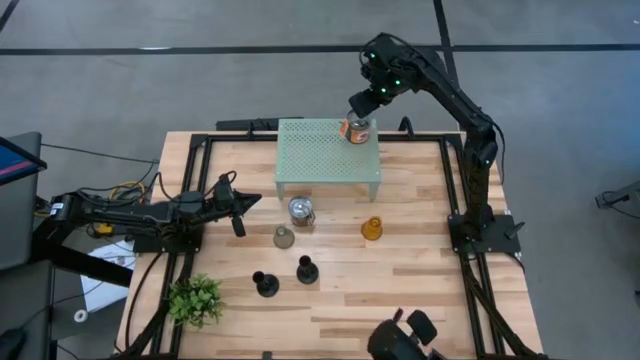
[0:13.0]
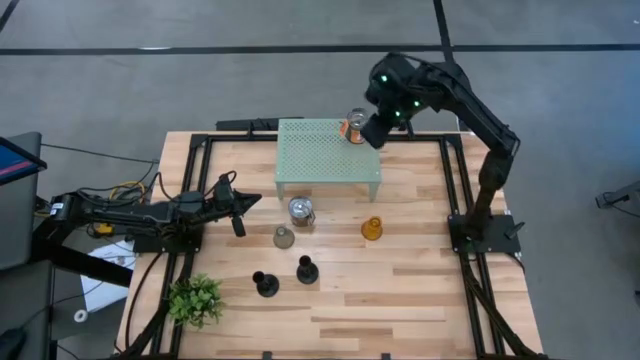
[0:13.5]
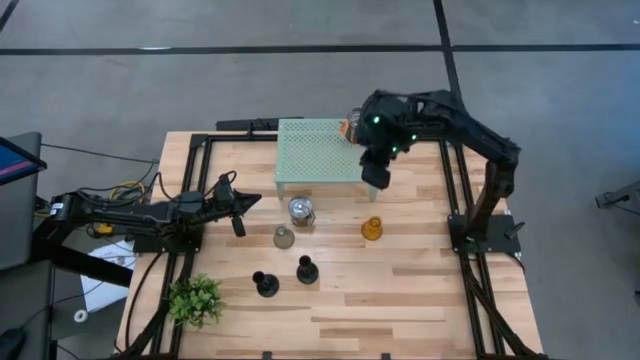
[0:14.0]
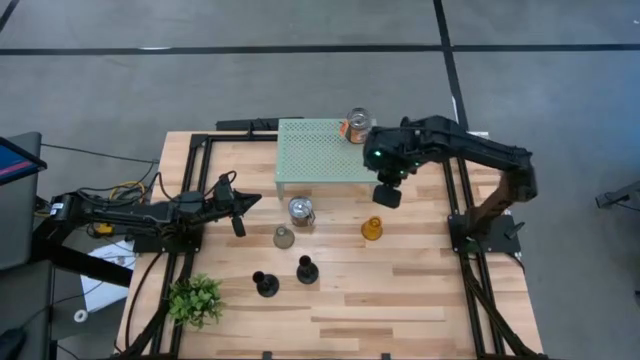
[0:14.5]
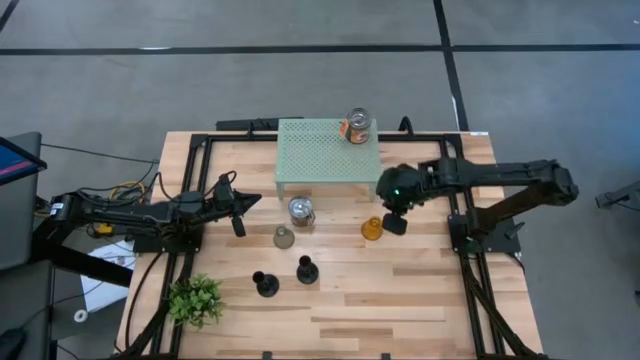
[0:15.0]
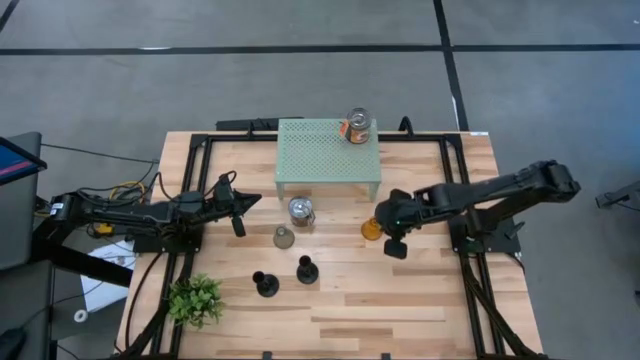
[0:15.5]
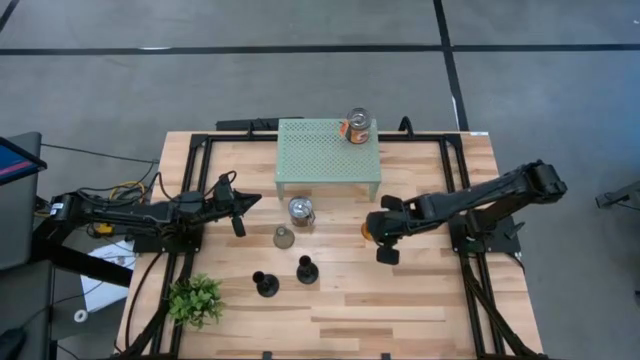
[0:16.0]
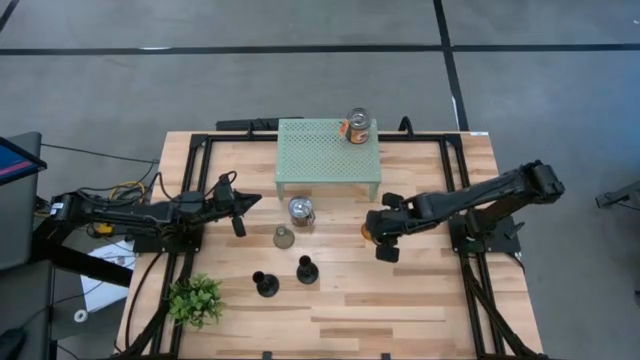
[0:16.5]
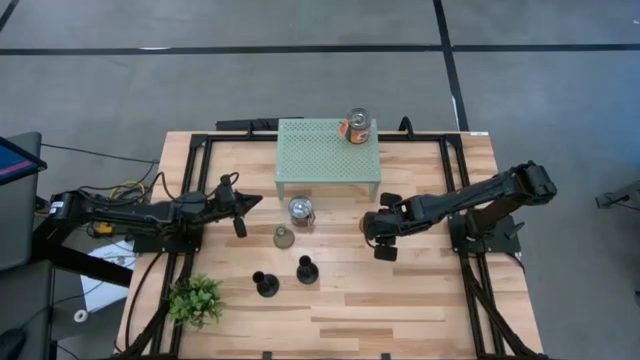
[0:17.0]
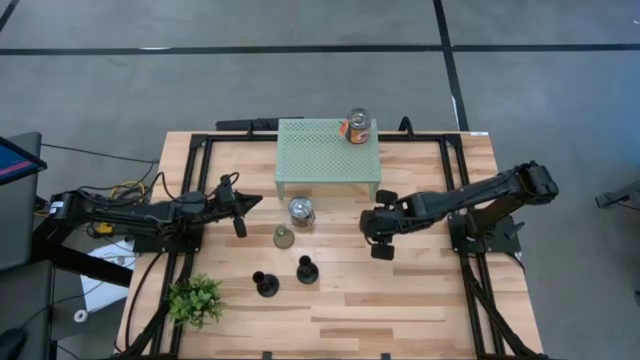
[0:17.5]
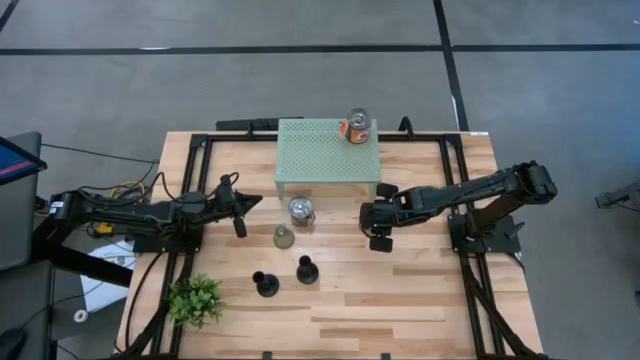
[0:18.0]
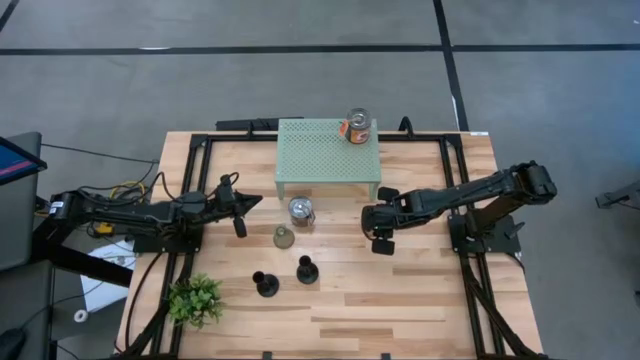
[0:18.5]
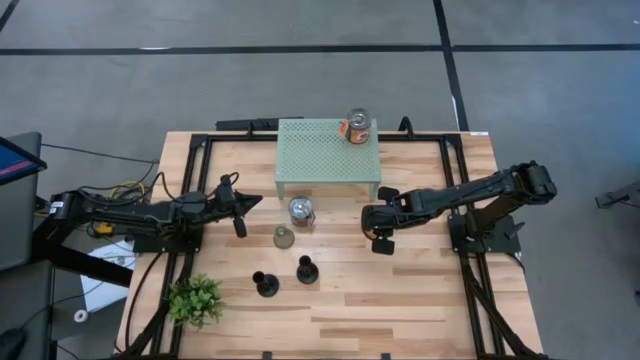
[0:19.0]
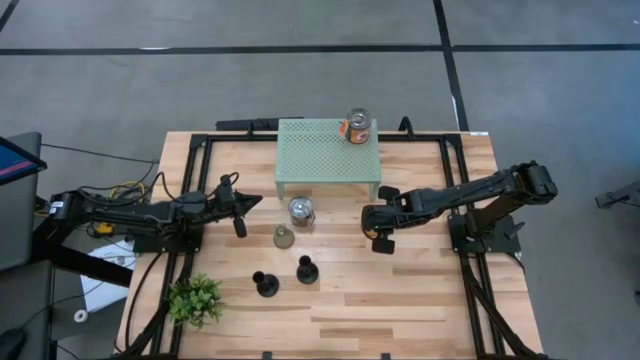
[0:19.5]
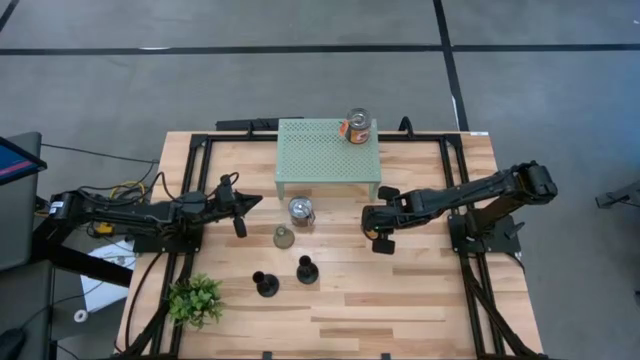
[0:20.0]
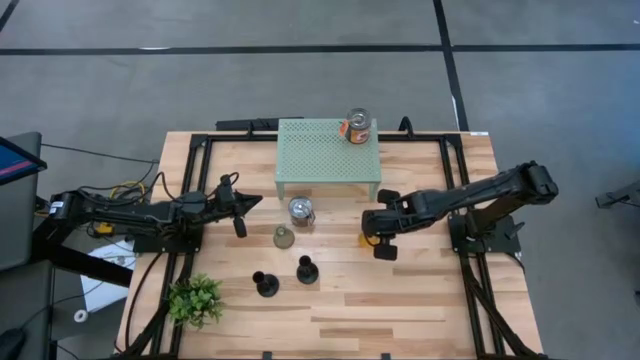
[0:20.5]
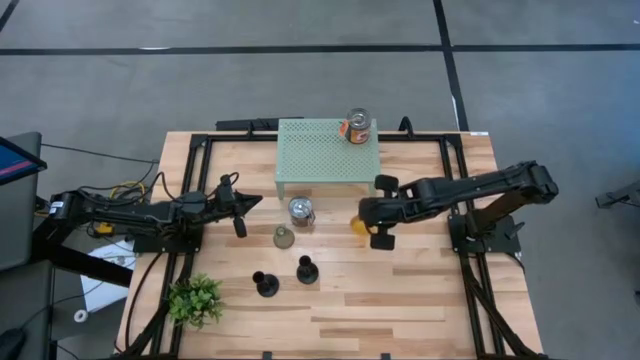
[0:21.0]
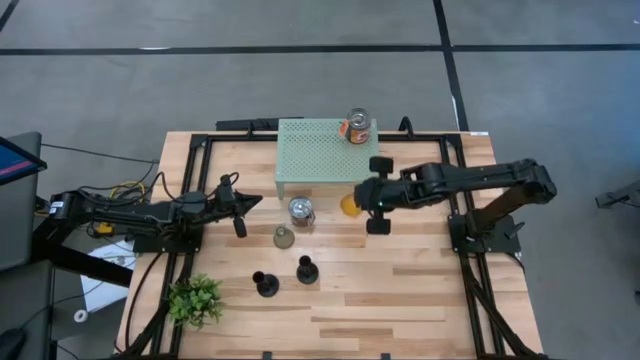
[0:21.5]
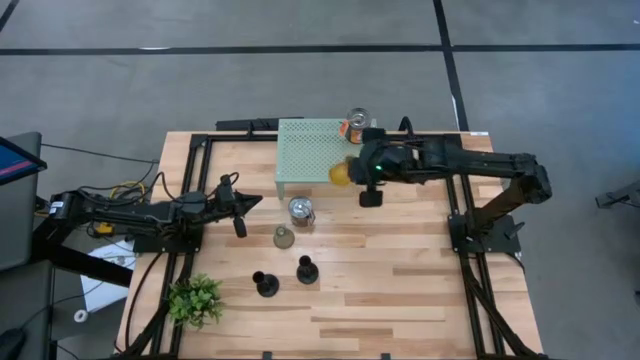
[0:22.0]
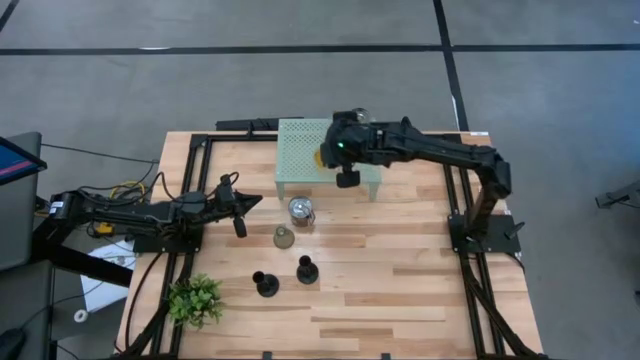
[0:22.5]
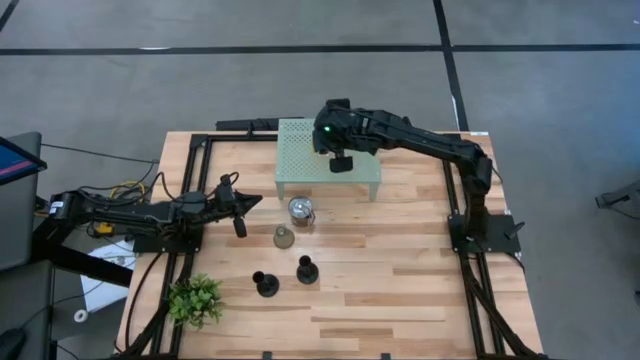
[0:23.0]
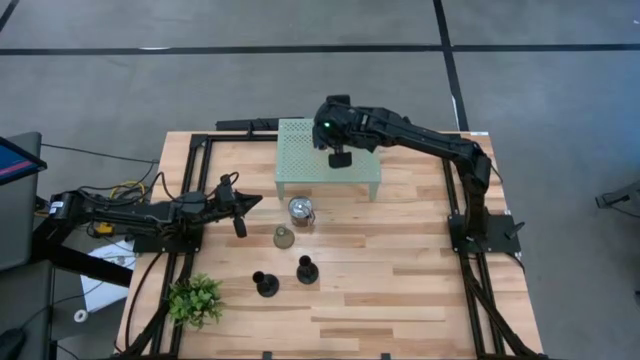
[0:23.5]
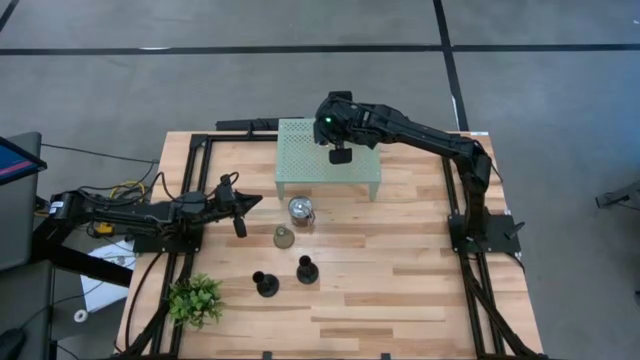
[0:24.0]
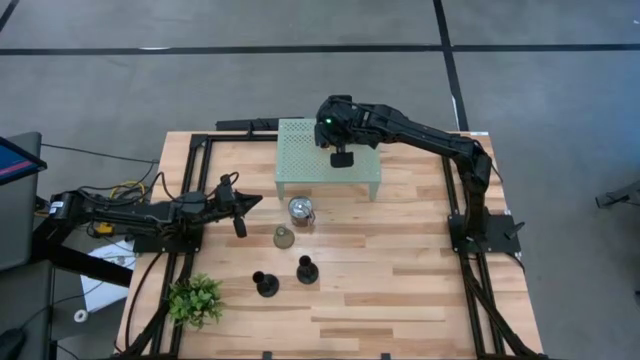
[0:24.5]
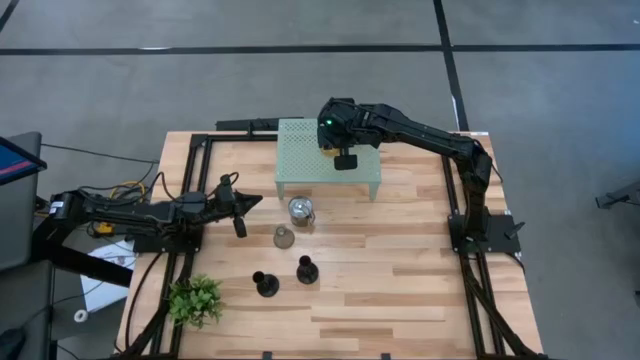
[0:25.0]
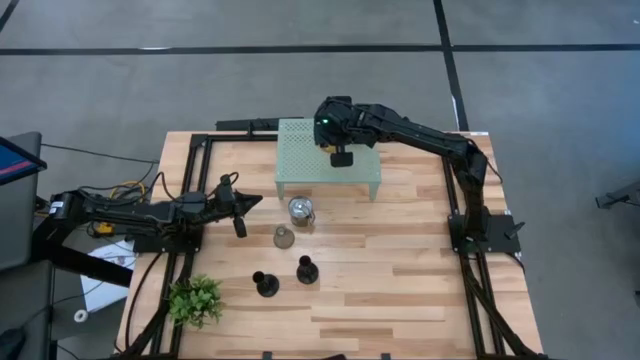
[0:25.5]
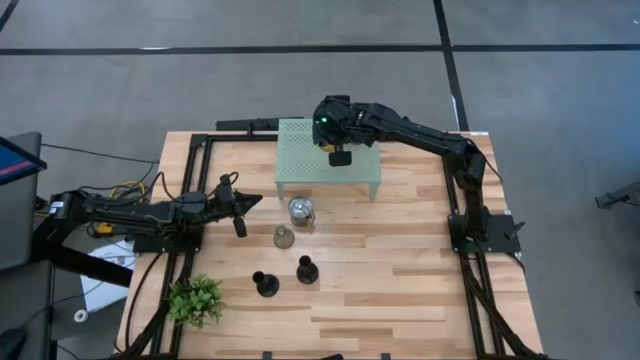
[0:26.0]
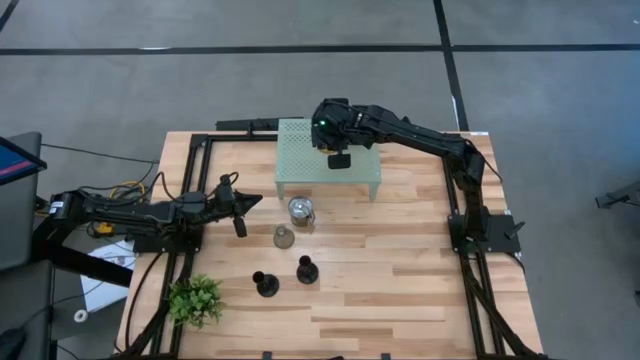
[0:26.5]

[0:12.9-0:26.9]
Task: Pick & Place candle stick holders
Put the yellow glass holder on the shelf

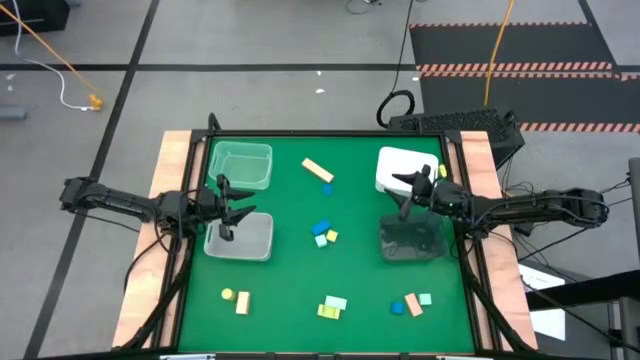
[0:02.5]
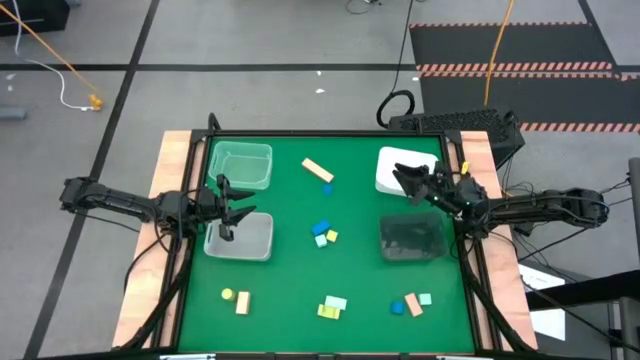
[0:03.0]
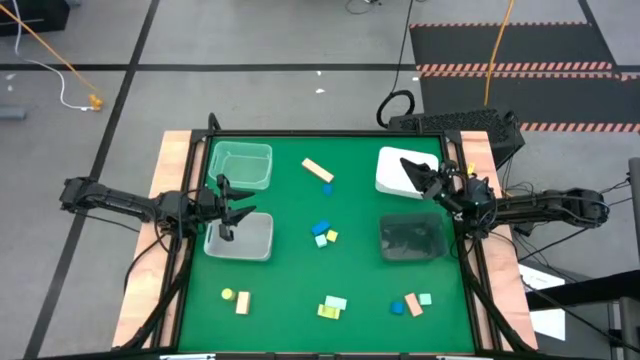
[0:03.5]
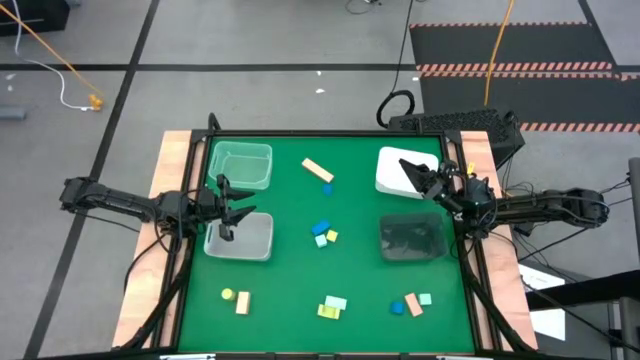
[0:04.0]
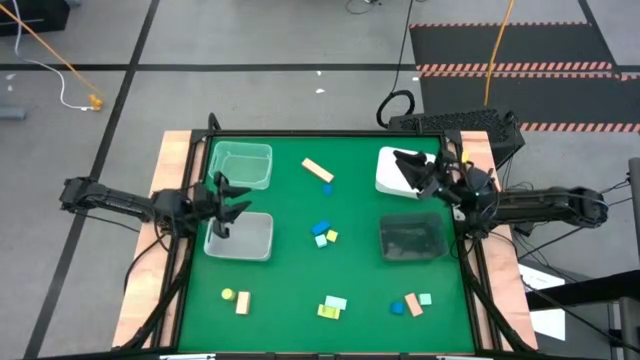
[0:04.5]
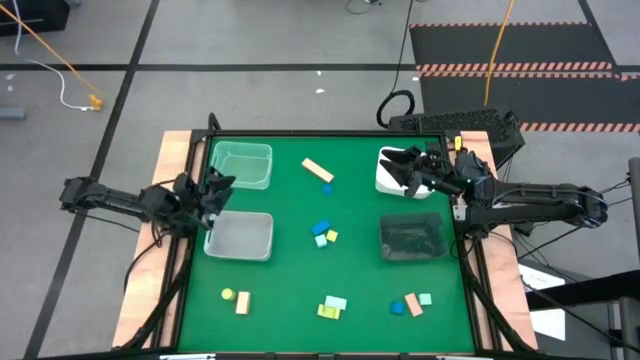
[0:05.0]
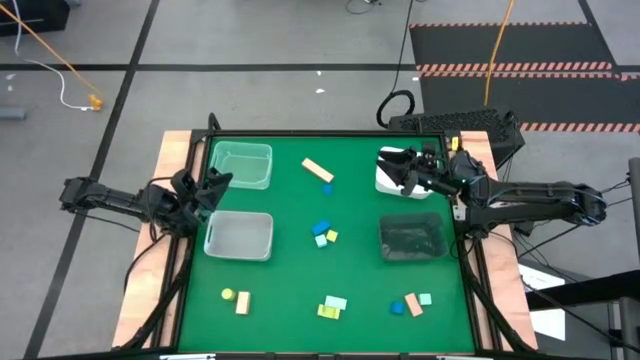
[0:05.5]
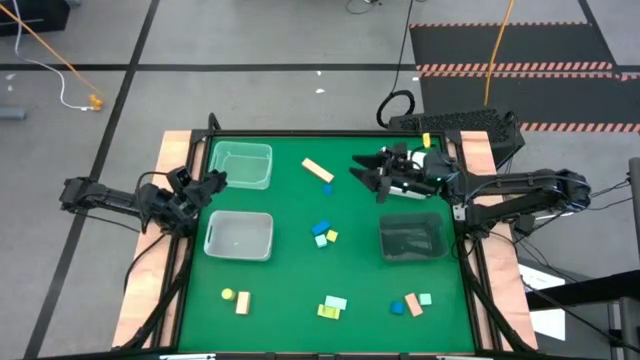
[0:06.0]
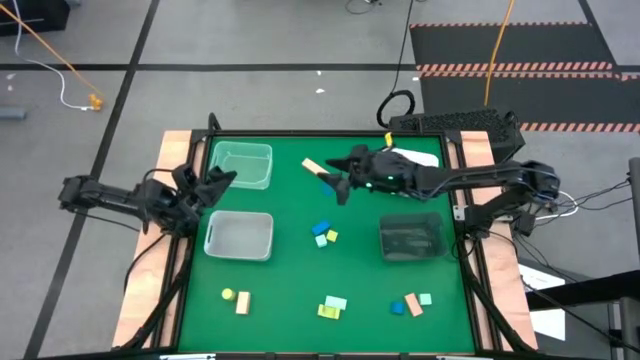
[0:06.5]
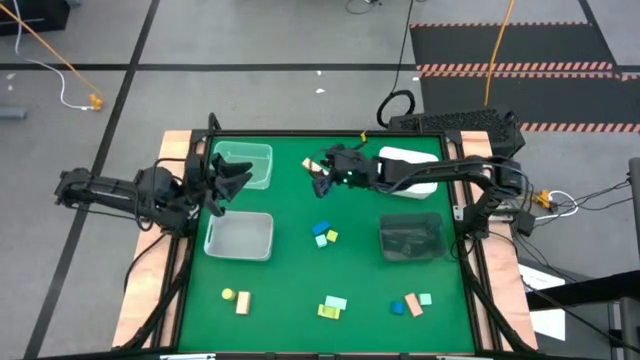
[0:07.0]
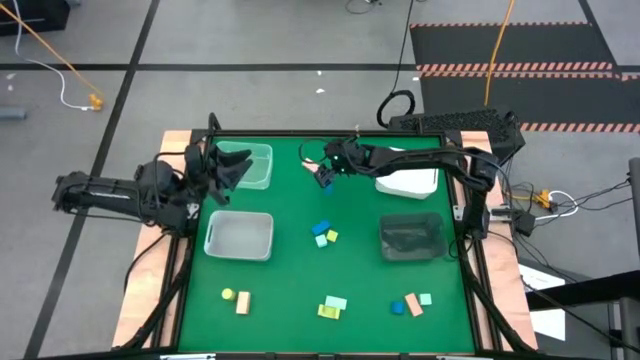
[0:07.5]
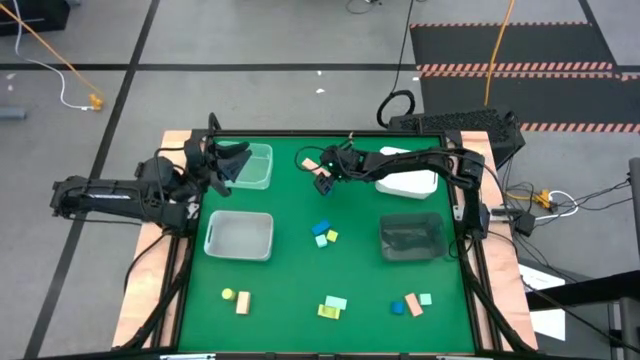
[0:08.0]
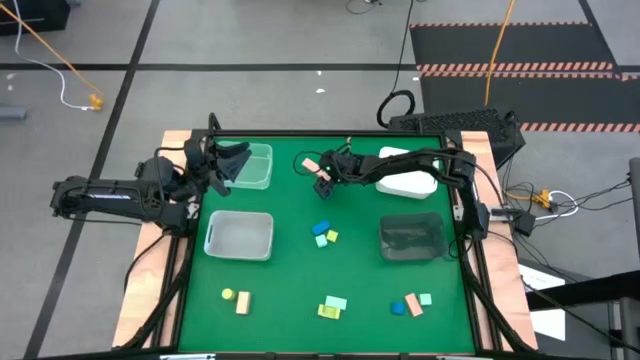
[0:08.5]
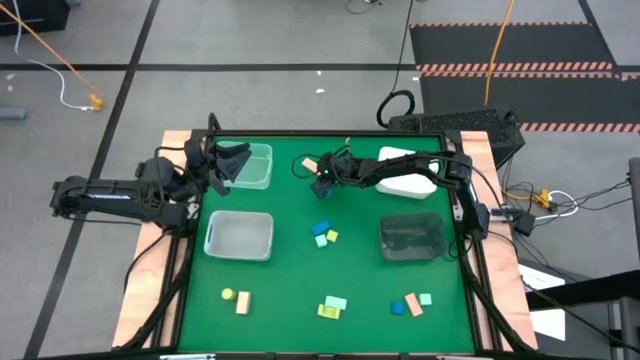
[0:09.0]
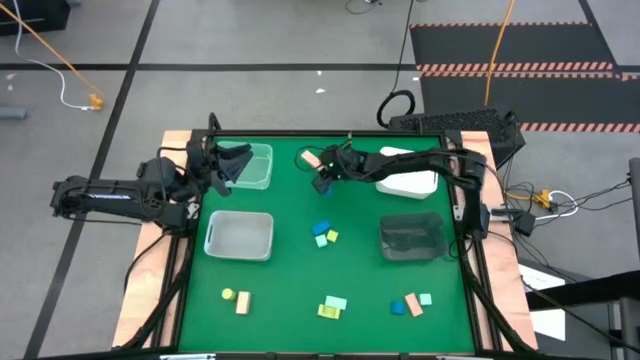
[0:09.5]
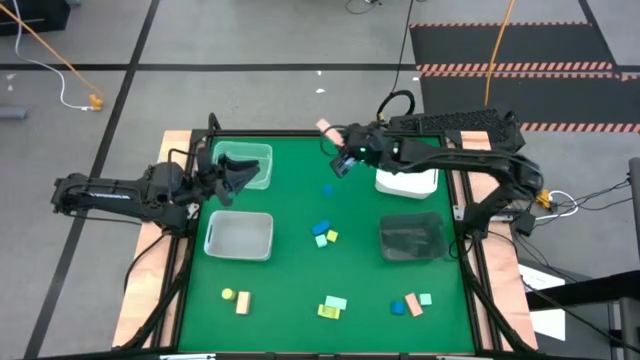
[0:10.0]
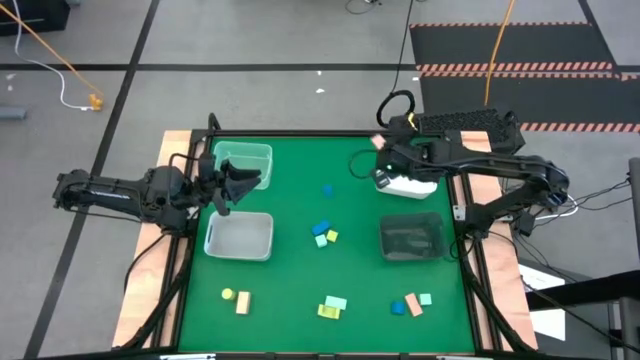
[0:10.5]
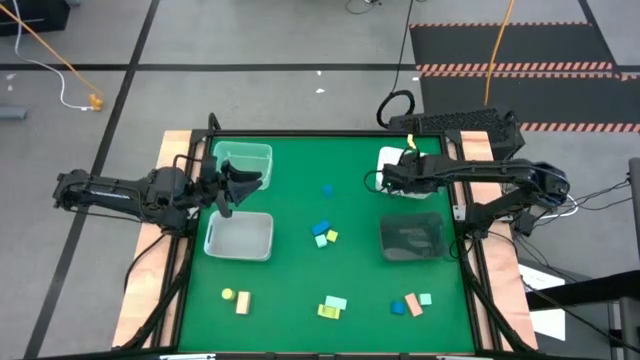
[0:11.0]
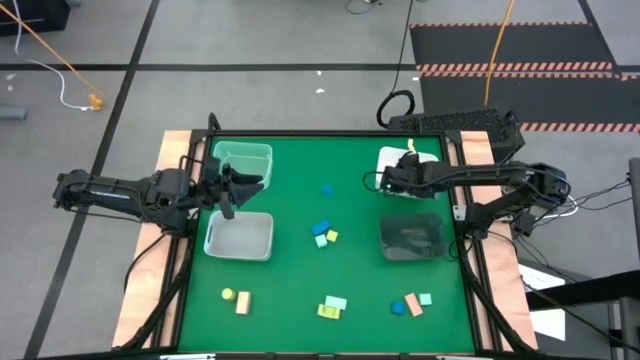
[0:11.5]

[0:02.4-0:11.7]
Task: Sort & place blocks by color
Put the top brown block into the white bin
